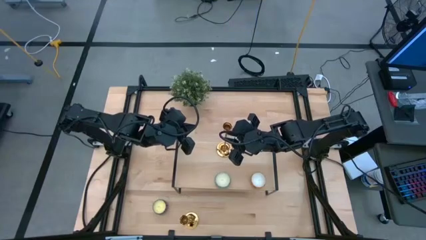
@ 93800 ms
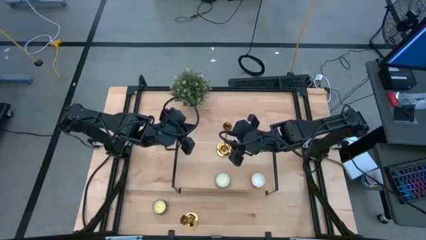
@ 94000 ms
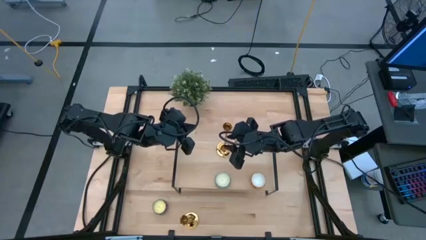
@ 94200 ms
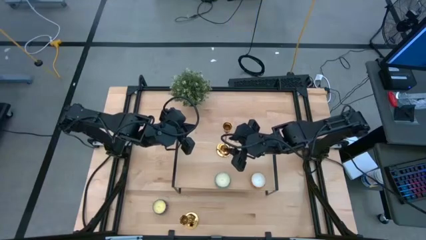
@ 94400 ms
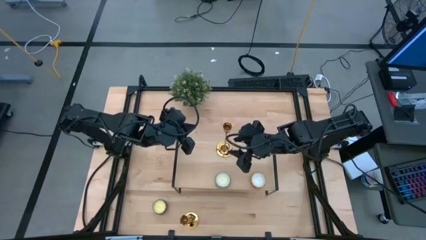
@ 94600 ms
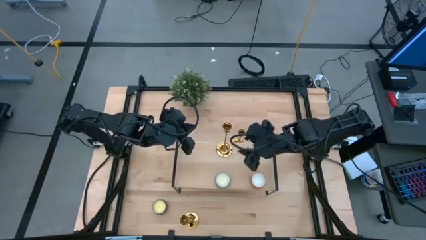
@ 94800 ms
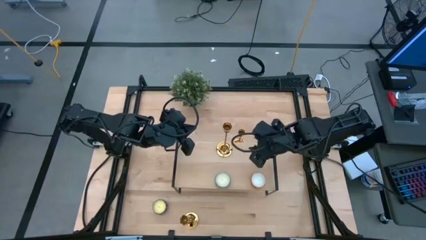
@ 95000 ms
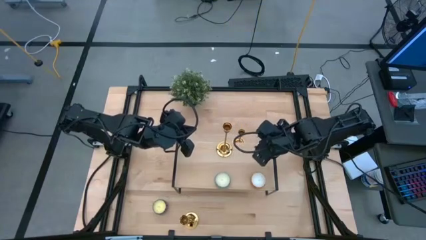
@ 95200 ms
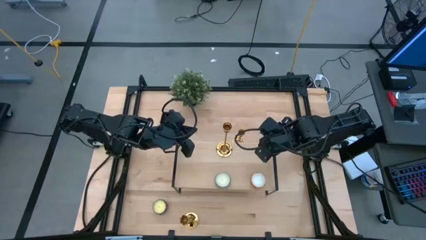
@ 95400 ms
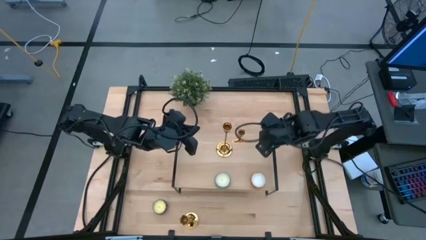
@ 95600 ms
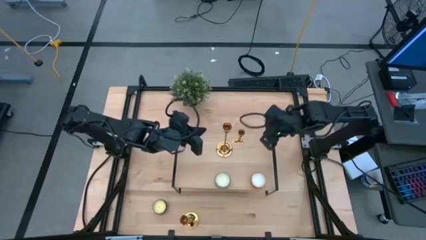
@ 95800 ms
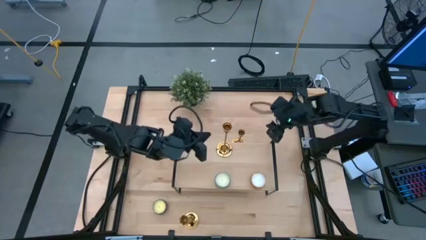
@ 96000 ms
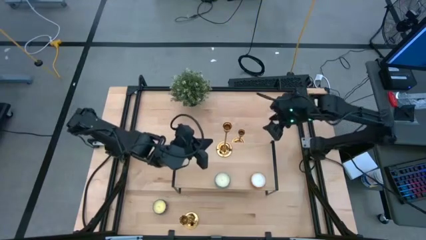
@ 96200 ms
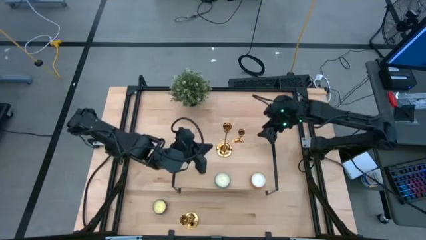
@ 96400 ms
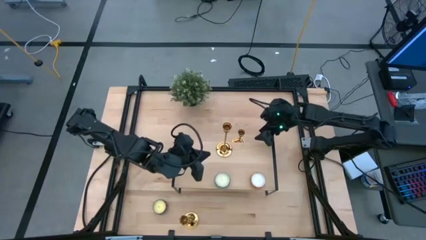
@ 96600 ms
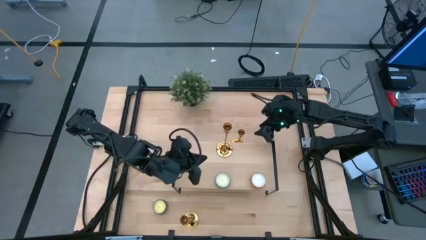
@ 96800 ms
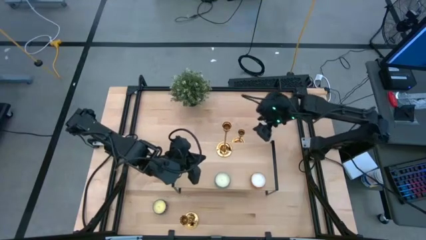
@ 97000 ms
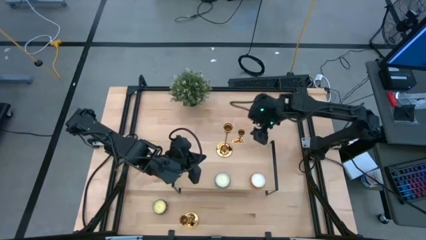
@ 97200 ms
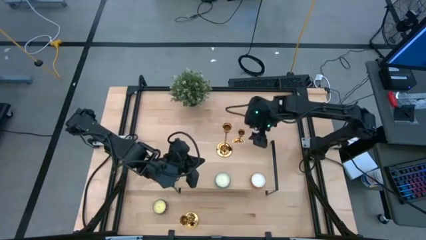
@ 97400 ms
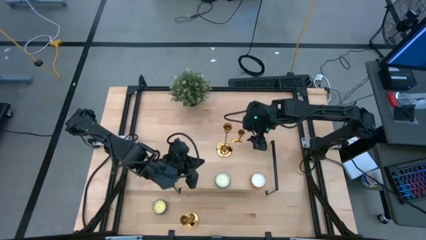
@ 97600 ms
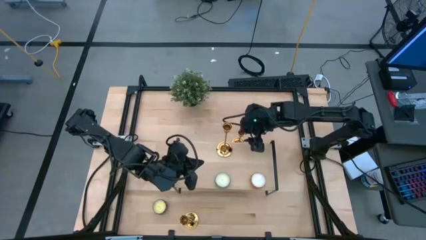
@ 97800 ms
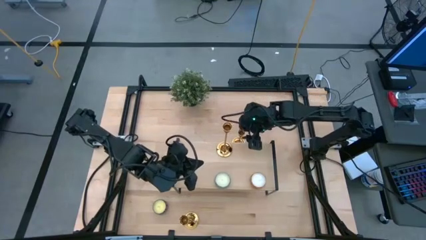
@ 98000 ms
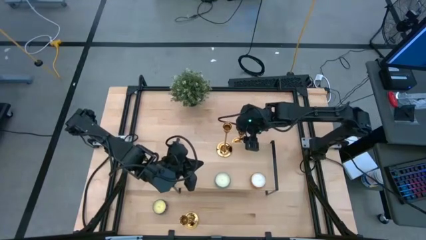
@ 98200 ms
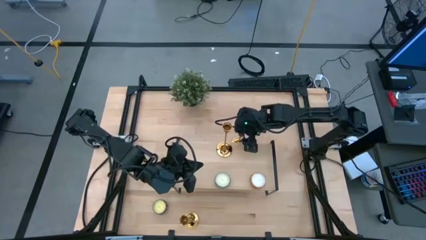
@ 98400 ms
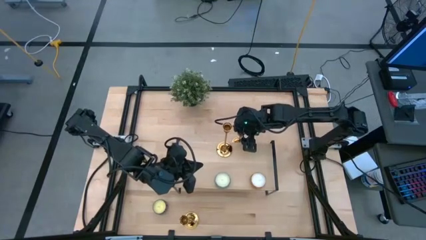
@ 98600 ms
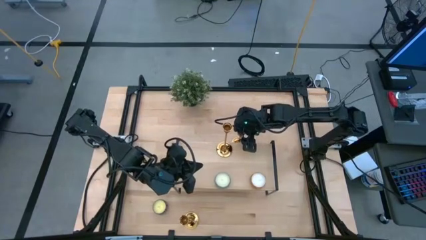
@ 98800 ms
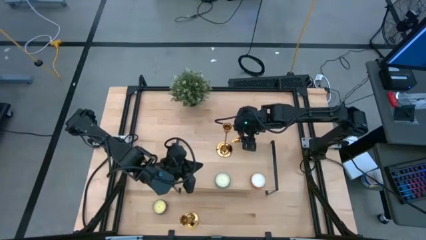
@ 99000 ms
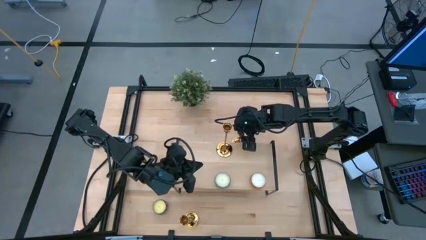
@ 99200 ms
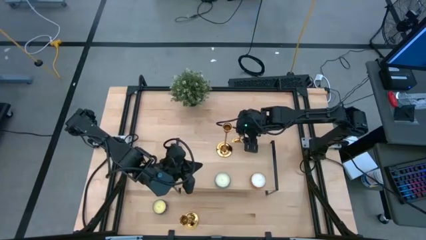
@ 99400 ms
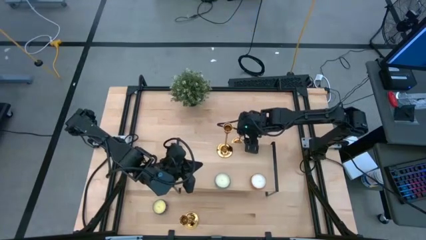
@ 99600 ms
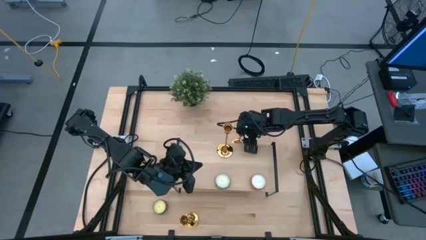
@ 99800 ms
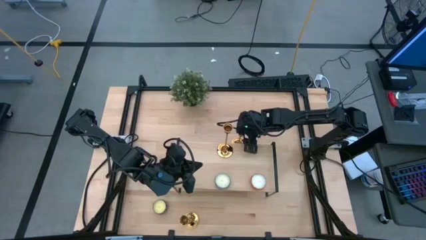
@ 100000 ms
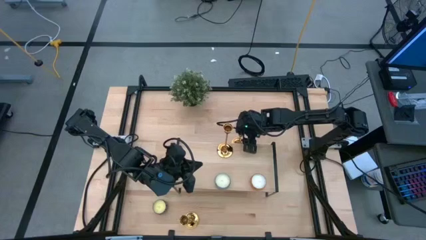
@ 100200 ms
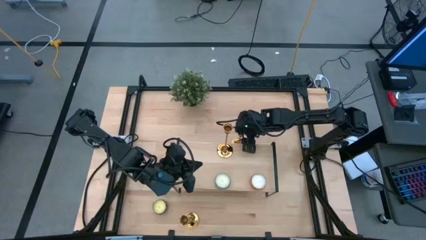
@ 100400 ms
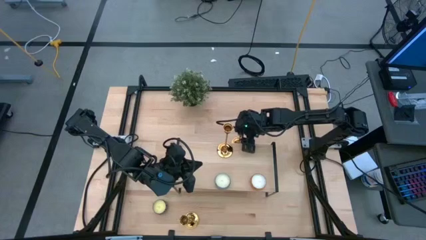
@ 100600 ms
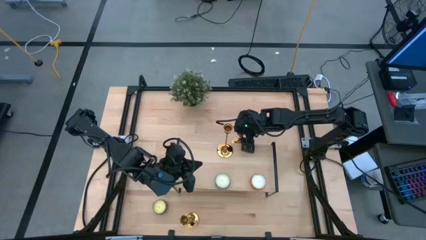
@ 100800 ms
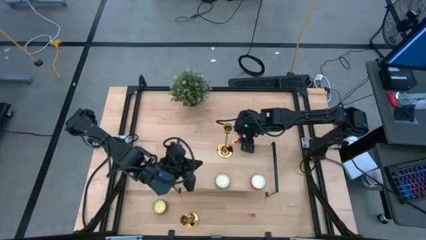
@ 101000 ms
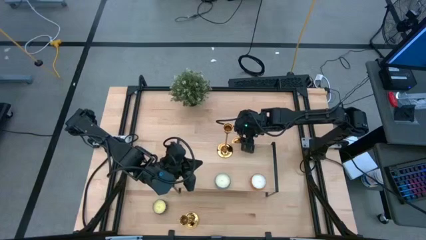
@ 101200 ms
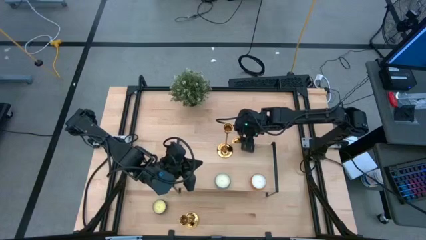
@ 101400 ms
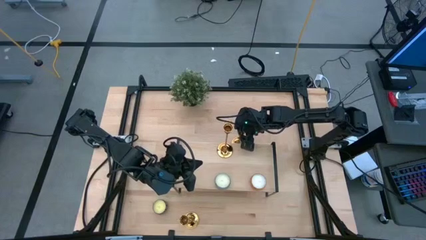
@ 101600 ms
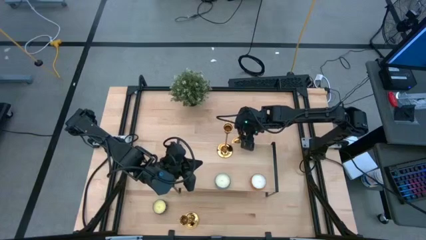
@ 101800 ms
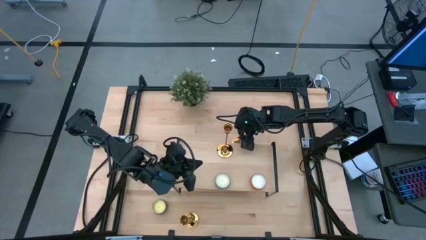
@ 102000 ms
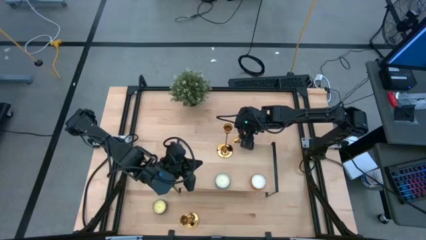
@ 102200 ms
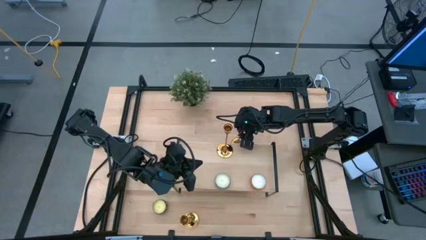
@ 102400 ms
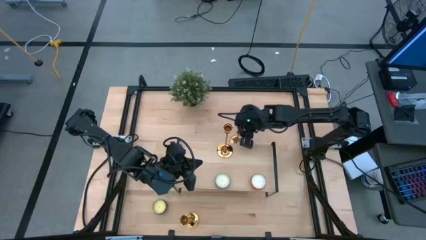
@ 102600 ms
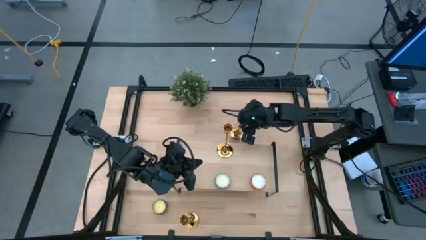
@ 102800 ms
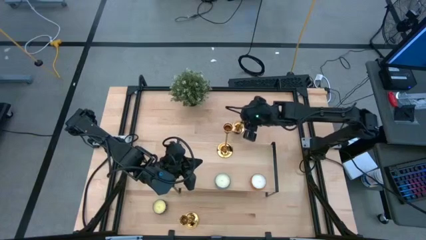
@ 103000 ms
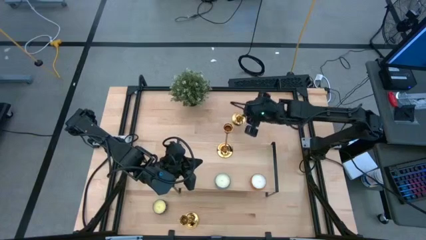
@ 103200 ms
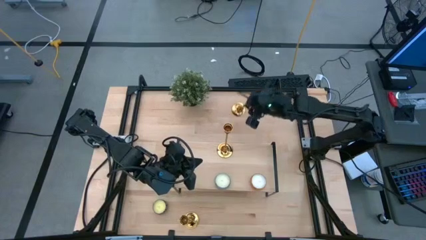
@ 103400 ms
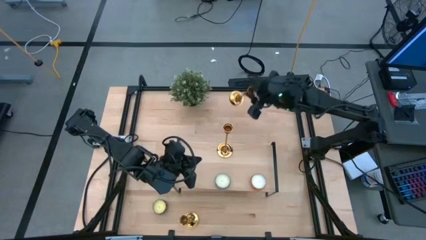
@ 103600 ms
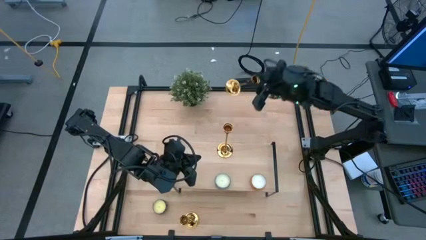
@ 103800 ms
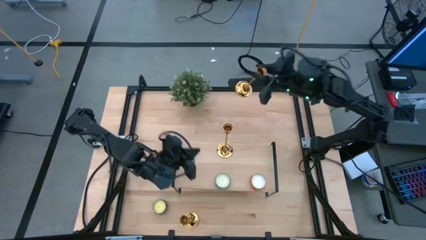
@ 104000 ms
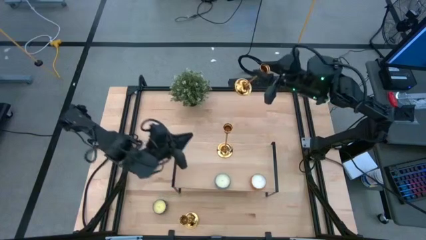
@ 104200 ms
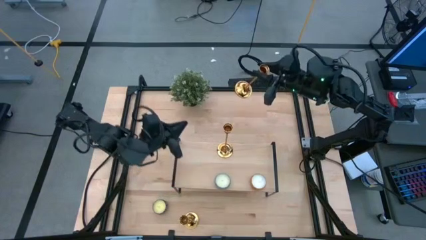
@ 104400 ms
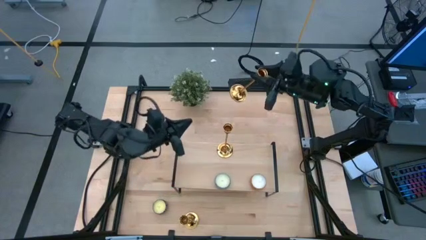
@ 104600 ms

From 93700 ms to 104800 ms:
Task: Pick & Place candle stick holders
Put the top candle holder on the shelf aligned with the other candle holder

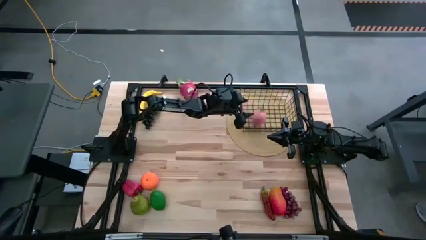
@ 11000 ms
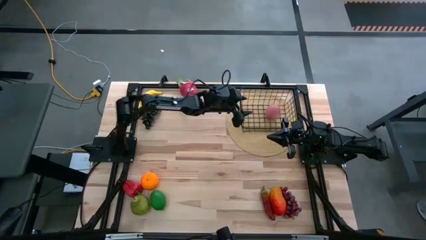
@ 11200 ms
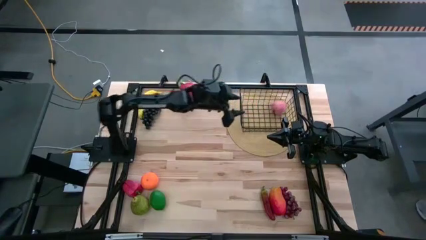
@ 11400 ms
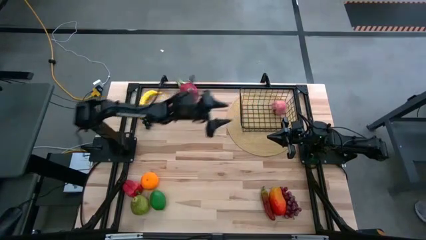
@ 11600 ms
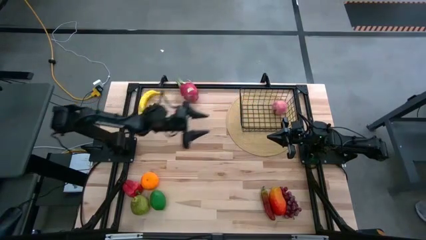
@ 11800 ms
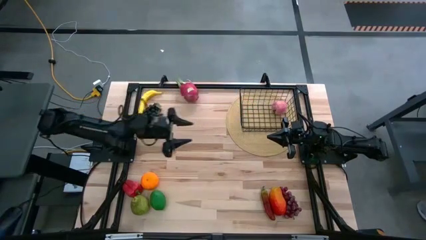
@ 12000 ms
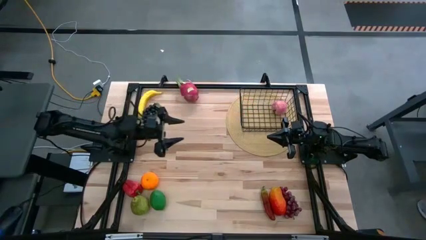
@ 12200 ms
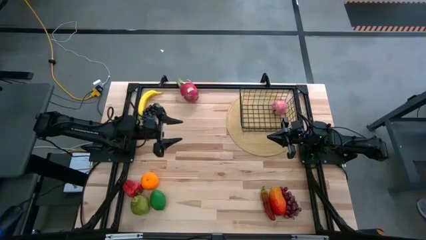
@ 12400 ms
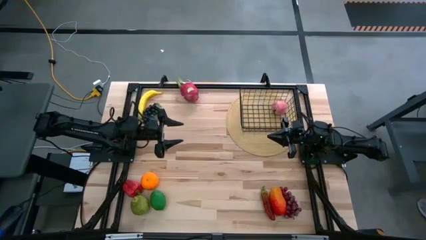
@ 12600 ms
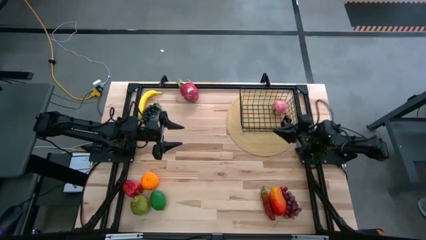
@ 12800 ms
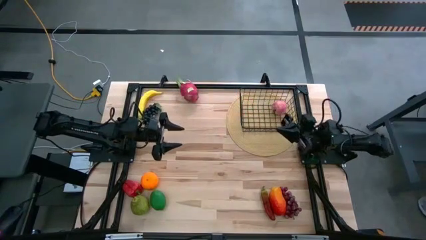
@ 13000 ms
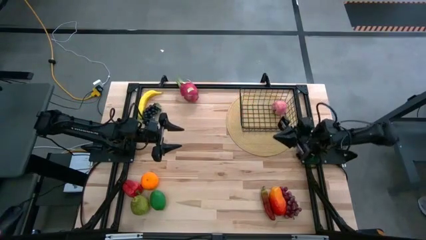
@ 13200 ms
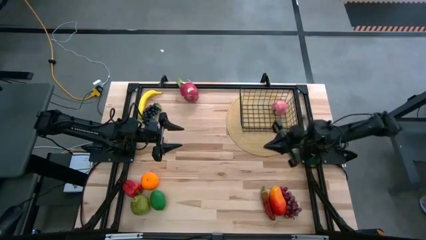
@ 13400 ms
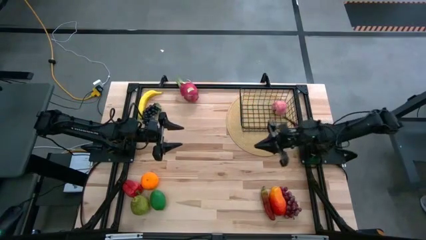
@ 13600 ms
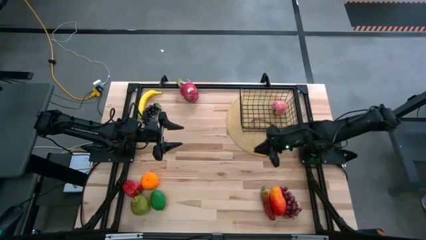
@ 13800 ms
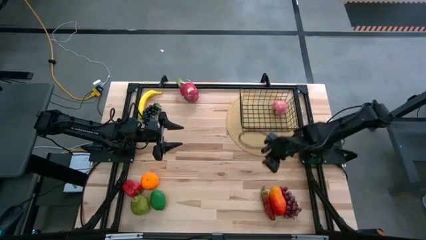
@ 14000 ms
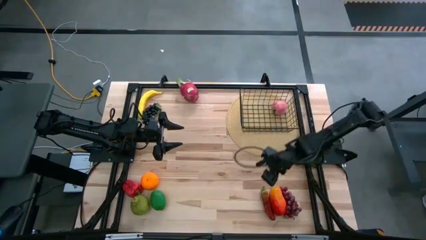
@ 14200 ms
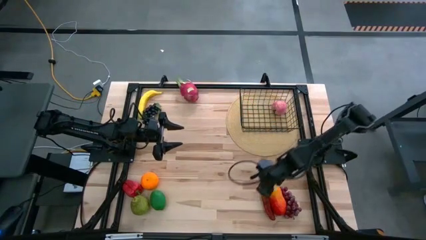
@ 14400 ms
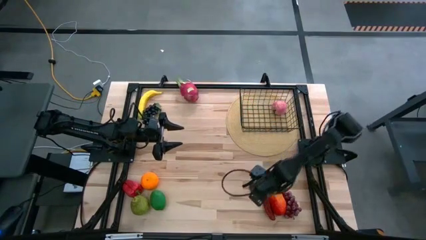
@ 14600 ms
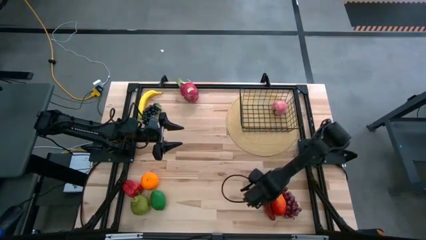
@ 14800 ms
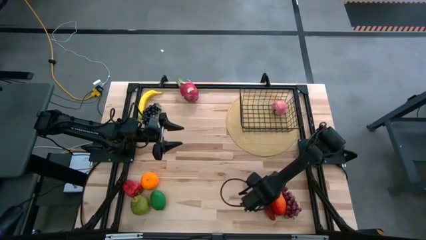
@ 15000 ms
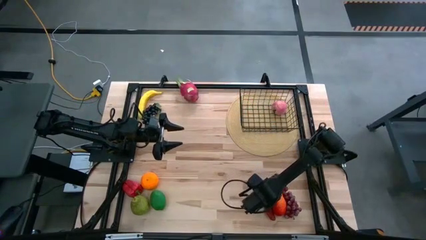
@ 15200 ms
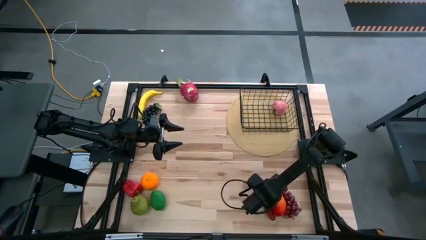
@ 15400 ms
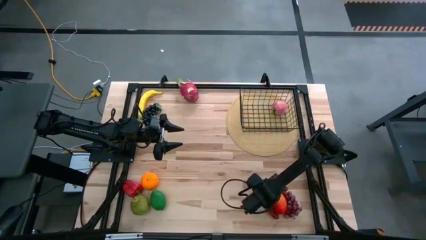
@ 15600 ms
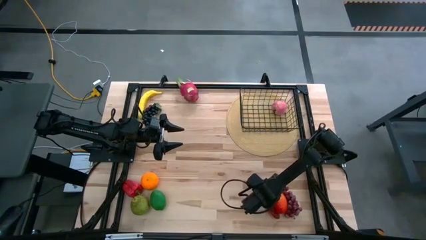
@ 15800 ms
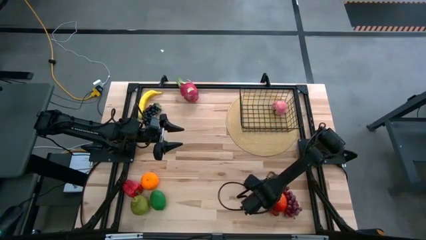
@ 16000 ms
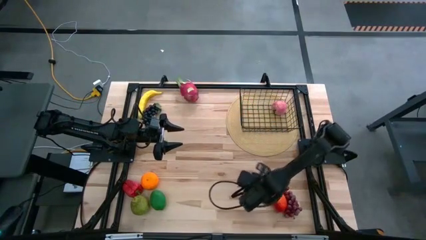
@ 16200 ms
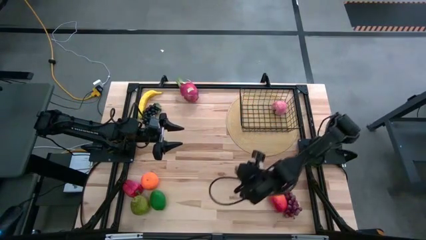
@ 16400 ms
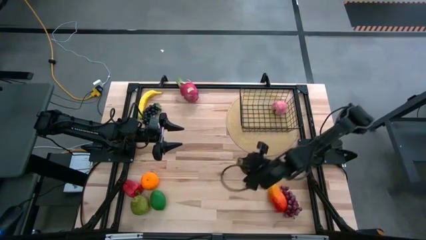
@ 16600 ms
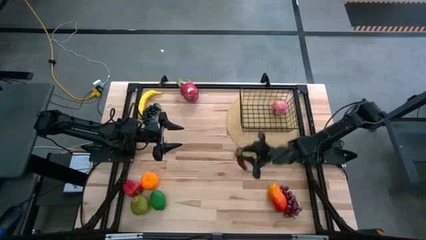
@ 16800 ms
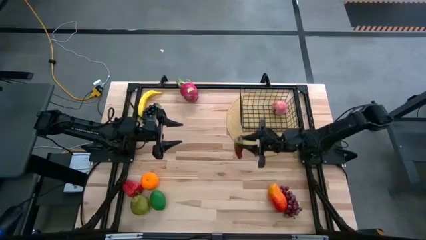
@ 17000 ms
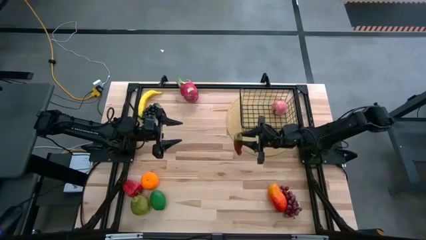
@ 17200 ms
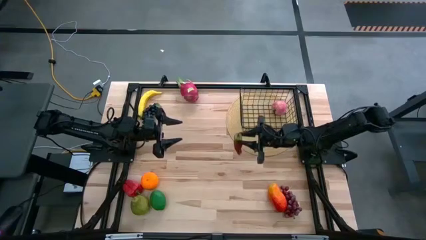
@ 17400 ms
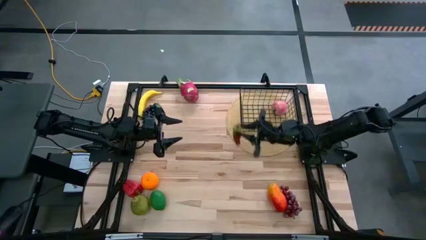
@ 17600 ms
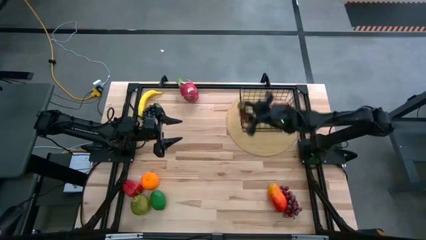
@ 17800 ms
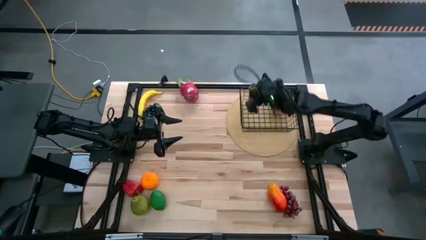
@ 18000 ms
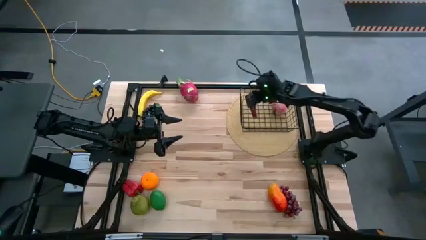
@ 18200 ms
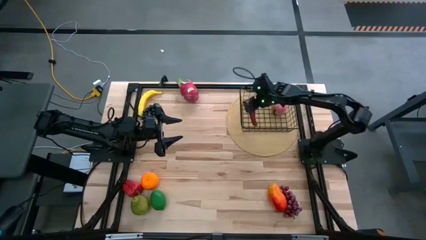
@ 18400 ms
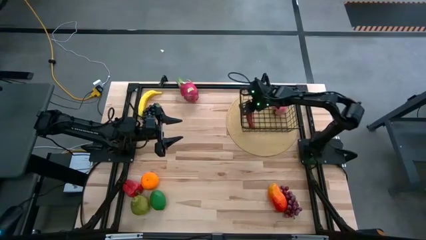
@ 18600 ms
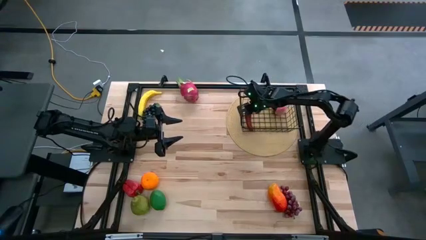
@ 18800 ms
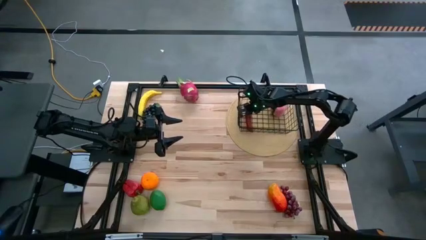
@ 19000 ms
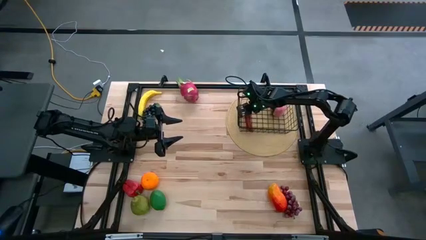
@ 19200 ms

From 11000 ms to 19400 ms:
Task: Build produce basket
Put the chili pepper into the wire basket
